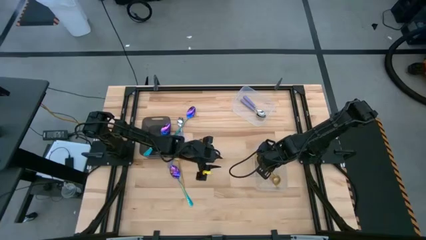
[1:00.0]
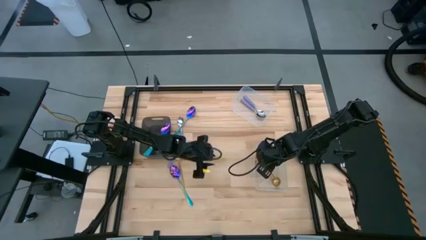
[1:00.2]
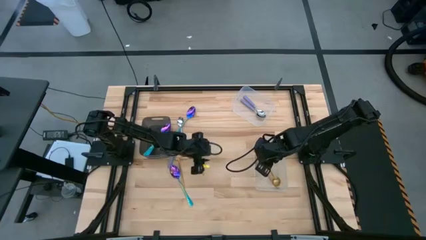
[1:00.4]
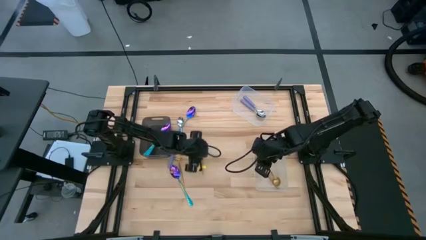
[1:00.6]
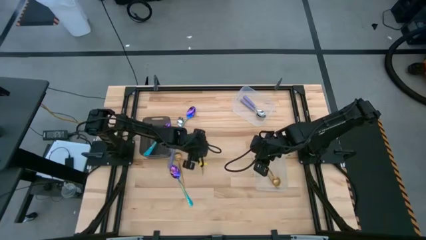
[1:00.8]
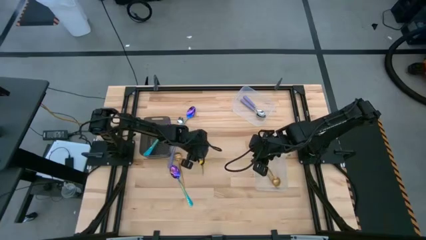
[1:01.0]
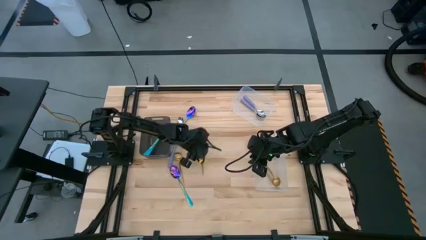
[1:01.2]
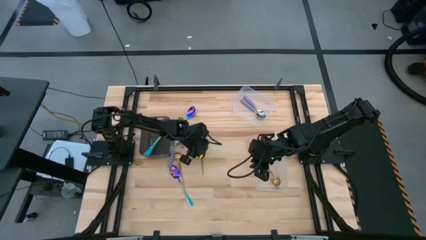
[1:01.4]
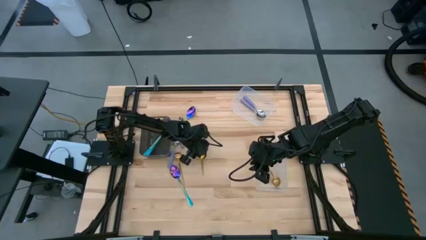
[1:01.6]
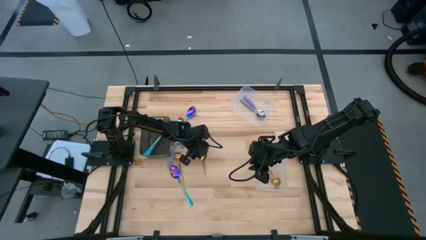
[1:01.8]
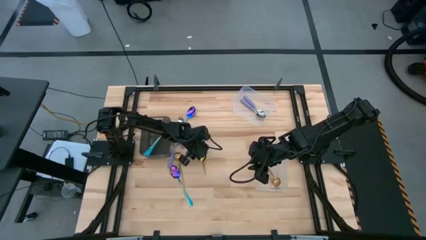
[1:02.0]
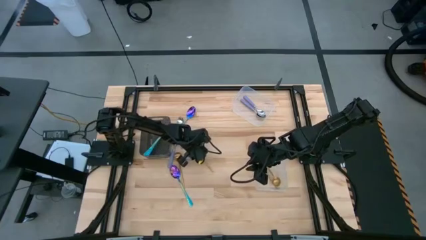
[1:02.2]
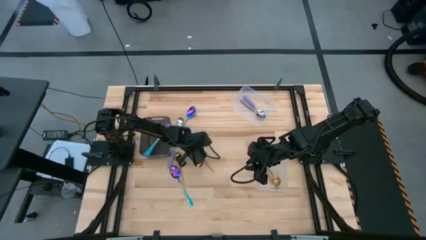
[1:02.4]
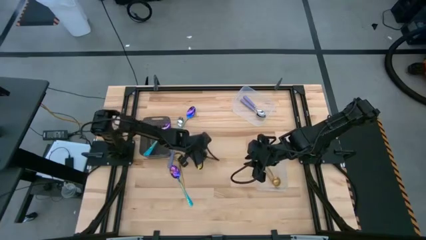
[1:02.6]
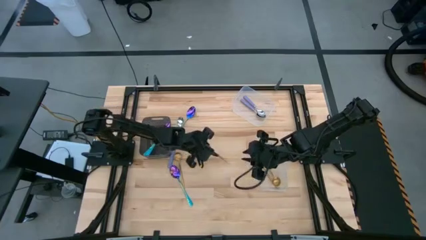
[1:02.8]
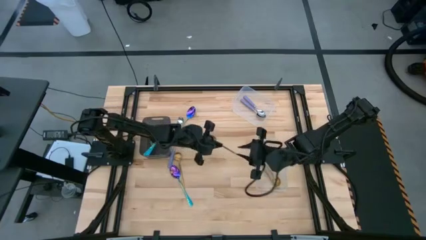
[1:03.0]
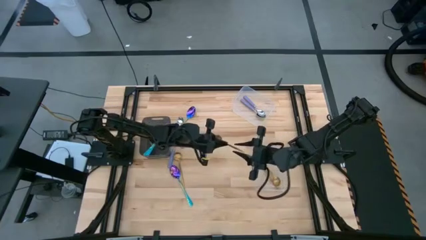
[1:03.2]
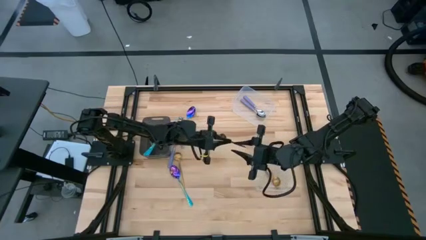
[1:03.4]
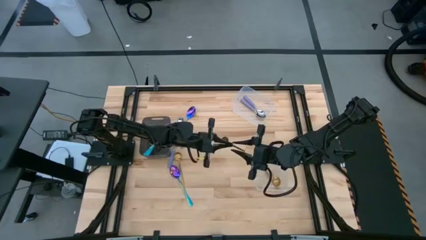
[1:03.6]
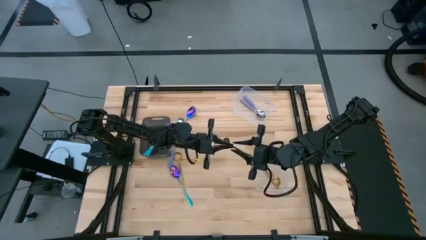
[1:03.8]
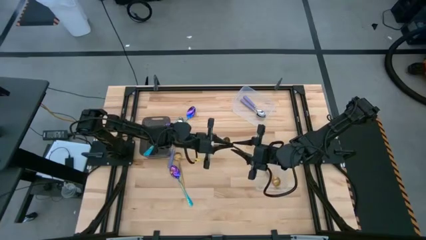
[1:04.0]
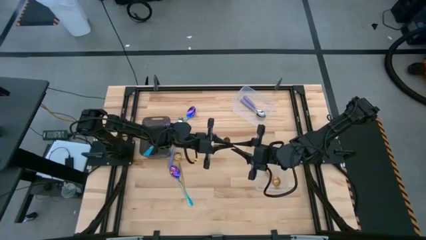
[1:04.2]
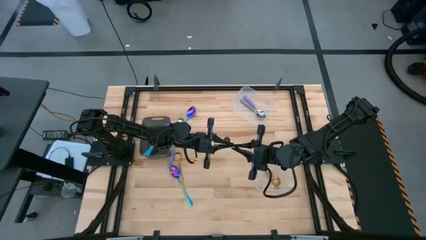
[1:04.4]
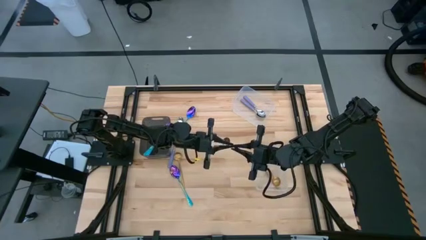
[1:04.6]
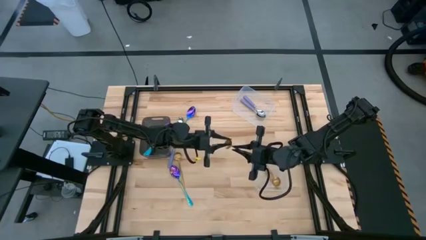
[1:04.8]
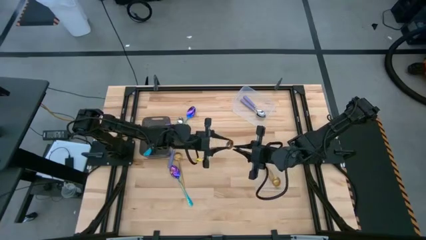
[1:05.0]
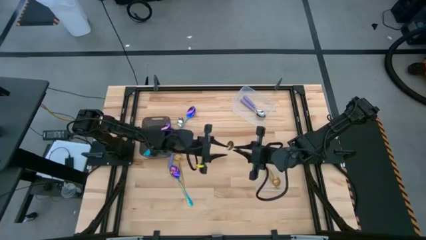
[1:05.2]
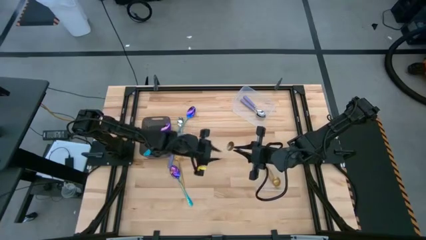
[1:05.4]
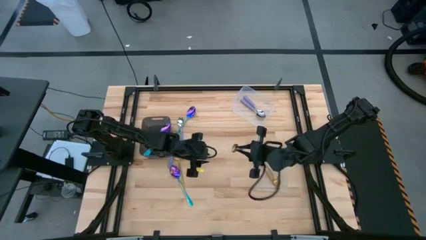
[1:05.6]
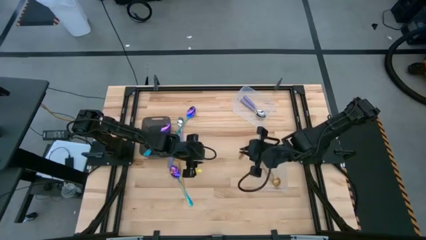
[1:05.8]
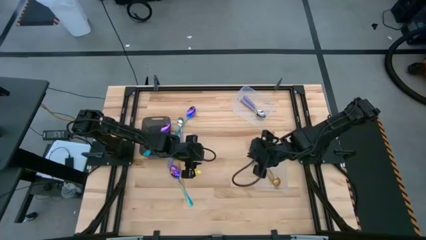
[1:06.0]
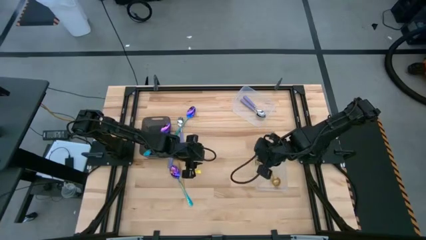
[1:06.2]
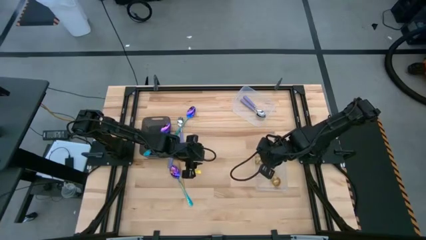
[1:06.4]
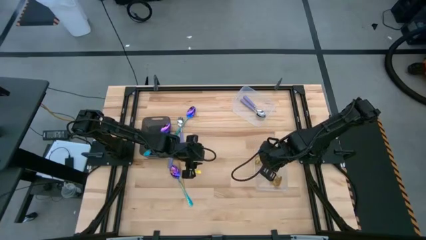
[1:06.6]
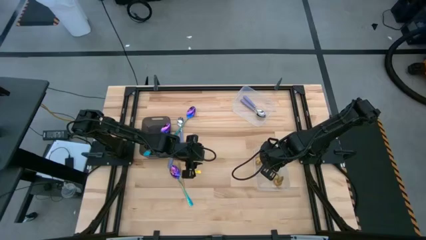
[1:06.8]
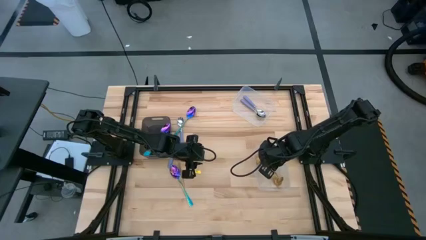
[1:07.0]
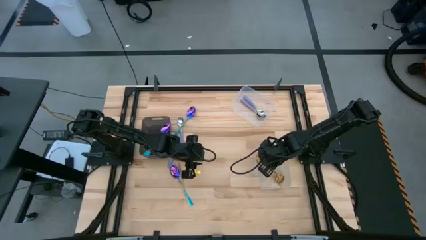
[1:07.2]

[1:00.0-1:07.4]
Task: Sort silverware by color (type)
Put the gold spoon into the bottom transparent bin

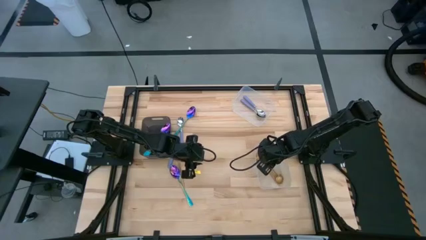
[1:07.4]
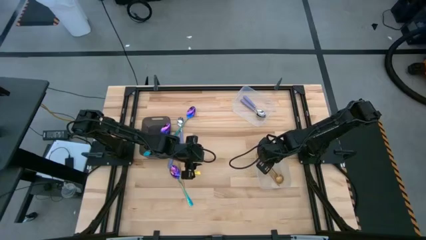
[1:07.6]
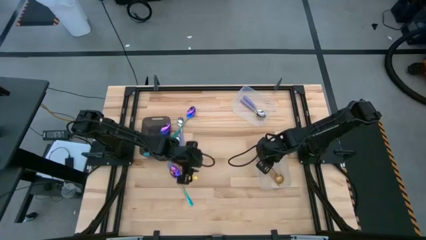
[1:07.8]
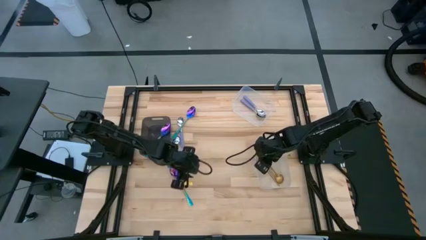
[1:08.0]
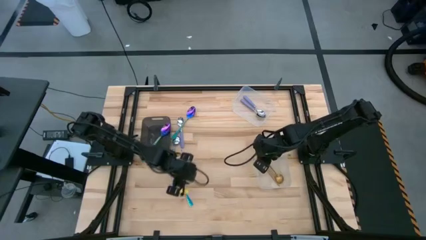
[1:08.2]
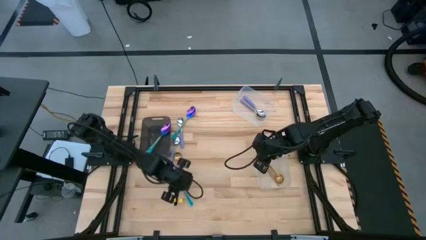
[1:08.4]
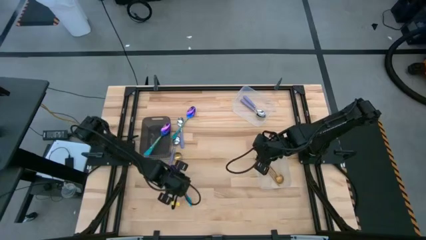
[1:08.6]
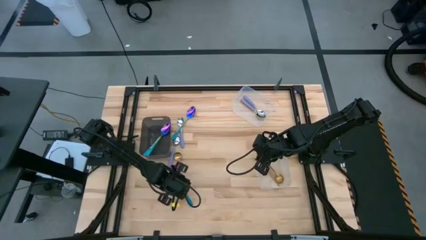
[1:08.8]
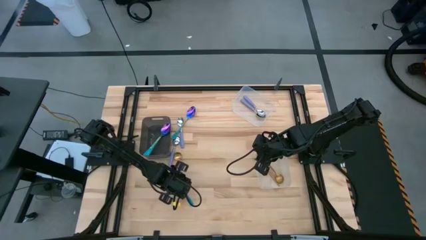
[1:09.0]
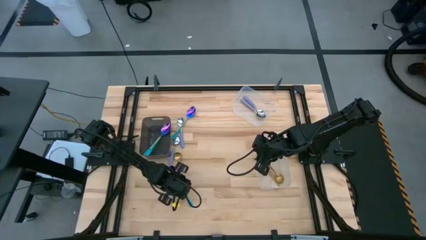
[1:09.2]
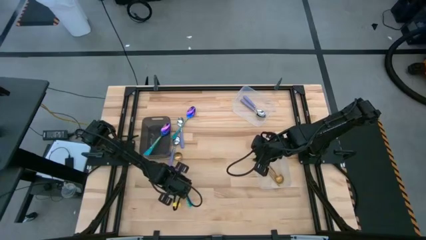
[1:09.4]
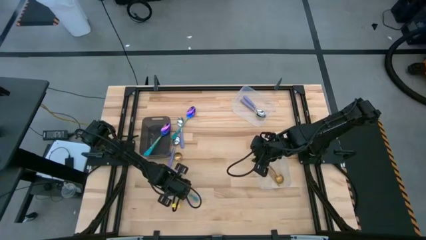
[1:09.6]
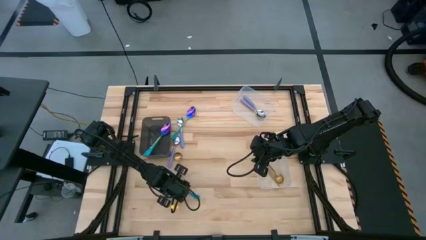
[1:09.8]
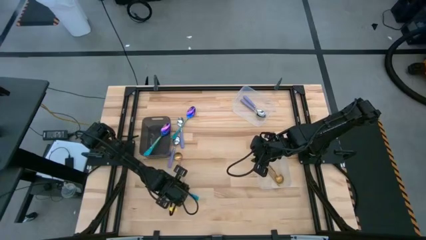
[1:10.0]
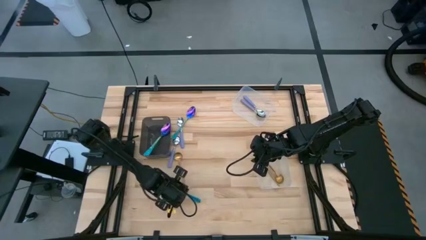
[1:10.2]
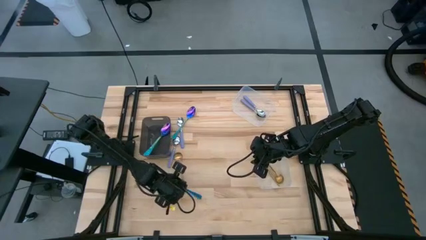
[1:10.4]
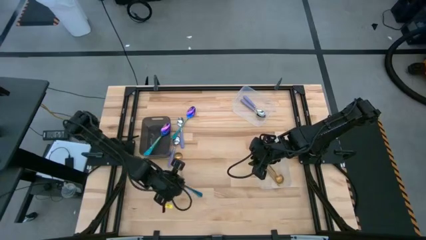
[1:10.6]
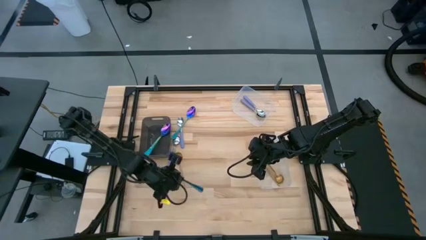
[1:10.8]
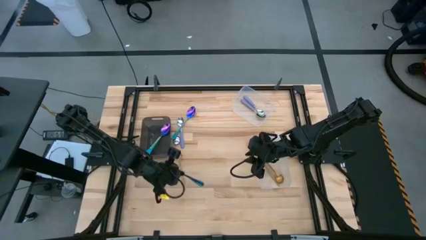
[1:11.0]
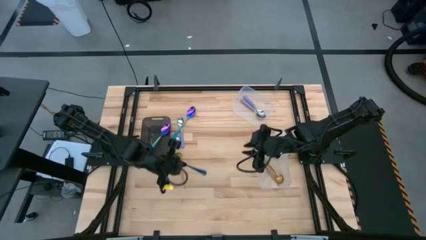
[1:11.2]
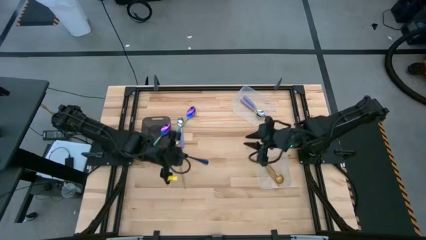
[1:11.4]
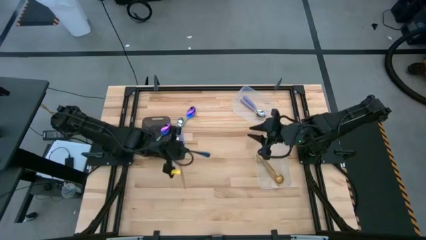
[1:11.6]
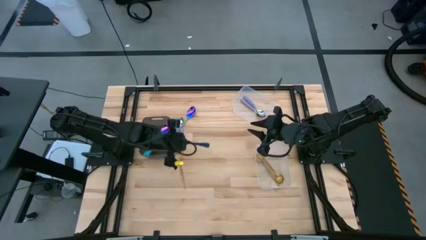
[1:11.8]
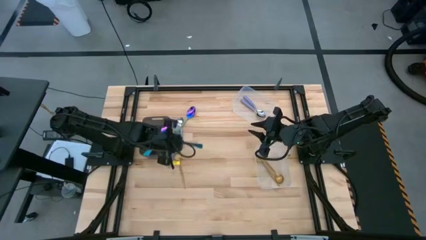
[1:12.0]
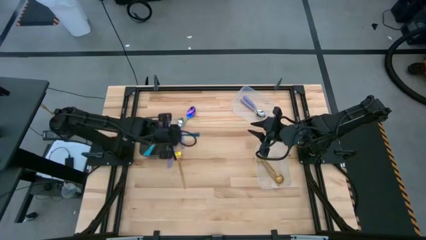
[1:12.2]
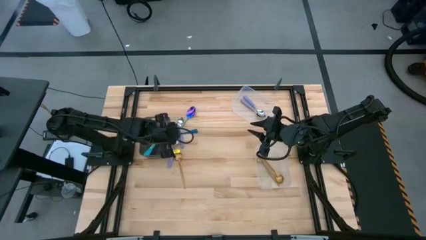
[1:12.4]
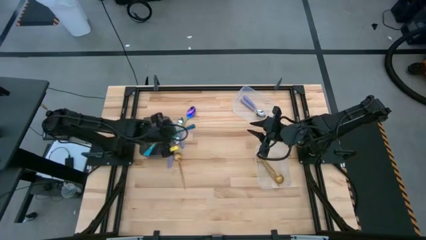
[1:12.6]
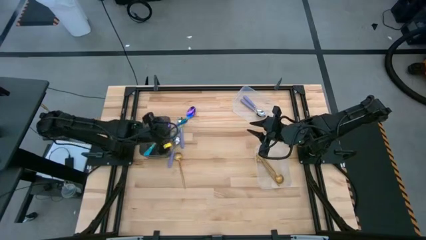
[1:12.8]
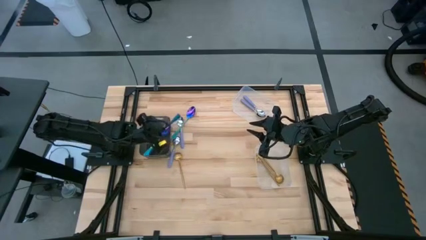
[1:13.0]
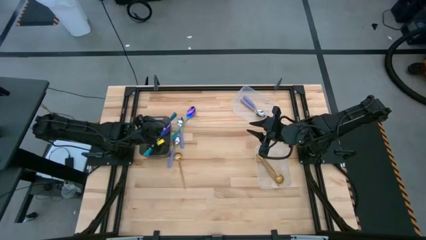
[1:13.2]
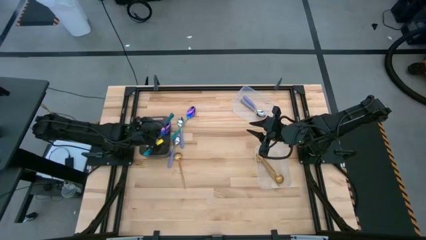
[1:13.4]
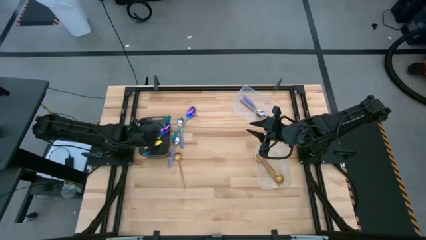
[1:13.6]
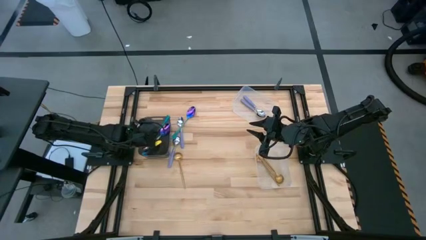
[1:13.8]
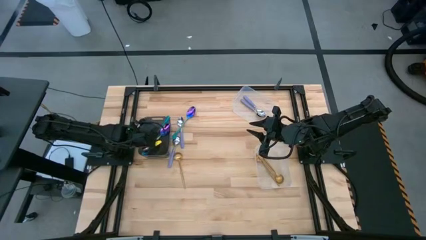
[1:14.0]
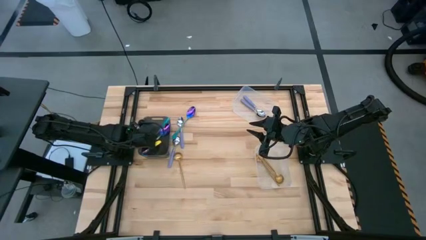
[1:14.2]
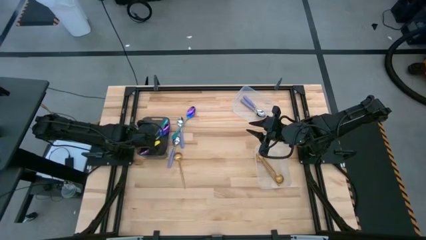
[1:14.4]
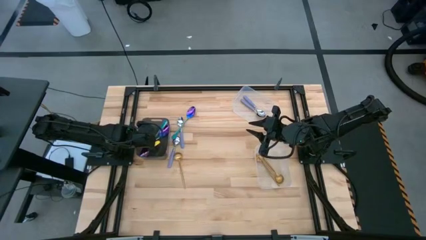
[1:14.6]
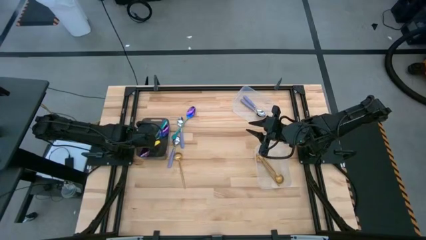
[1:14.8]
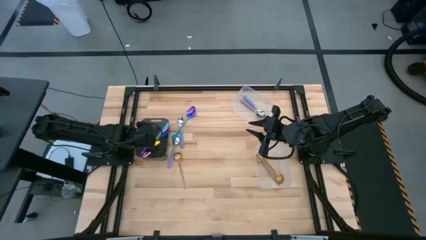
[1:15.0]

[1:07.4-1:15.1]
Put the blue spoon into the black bin
